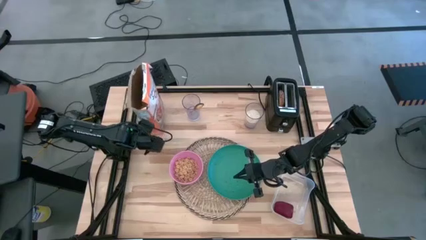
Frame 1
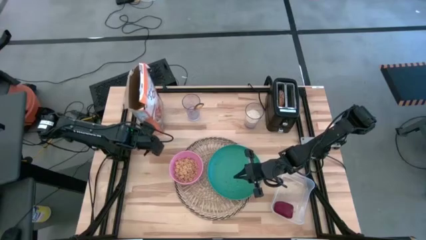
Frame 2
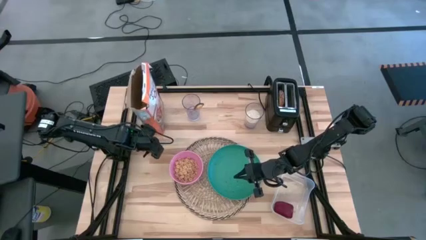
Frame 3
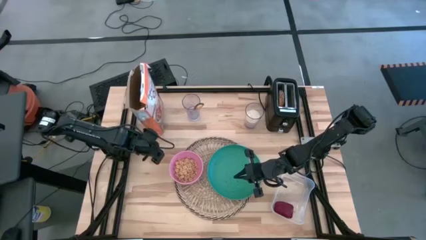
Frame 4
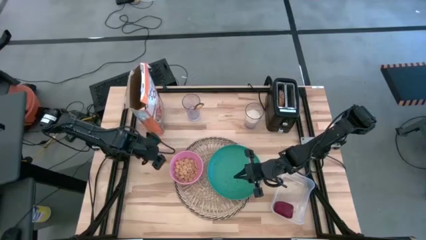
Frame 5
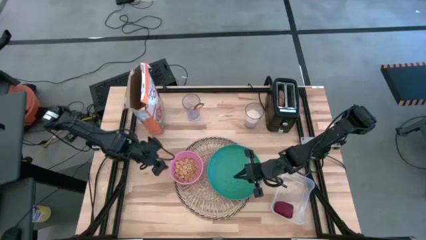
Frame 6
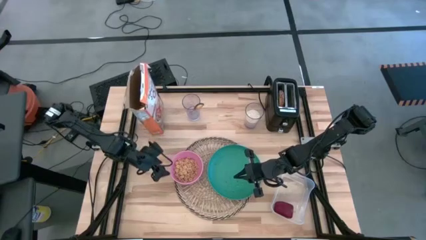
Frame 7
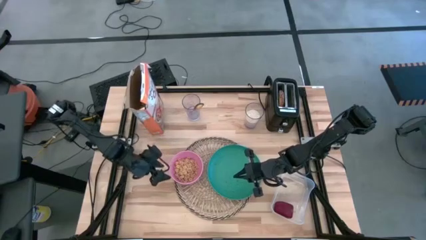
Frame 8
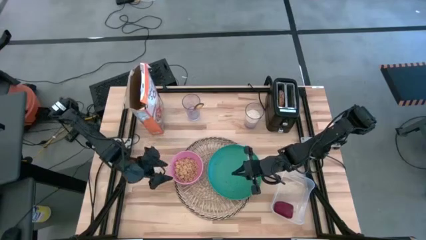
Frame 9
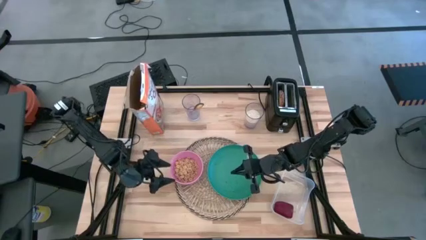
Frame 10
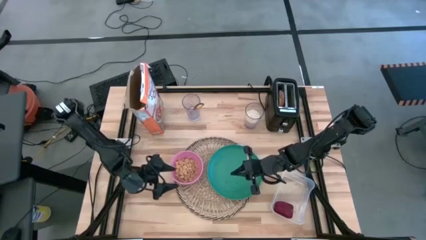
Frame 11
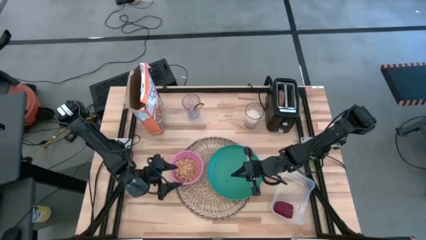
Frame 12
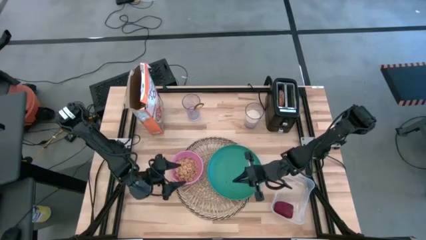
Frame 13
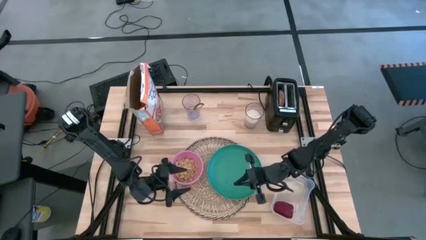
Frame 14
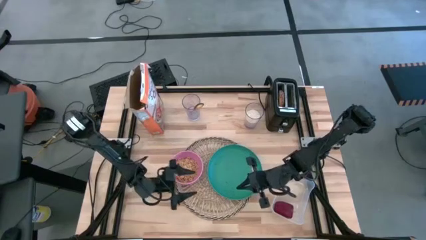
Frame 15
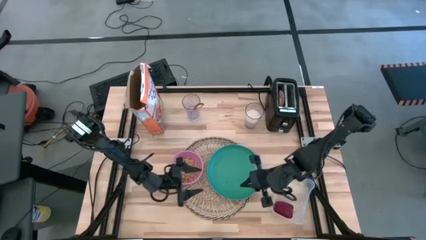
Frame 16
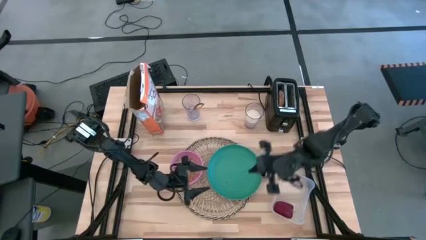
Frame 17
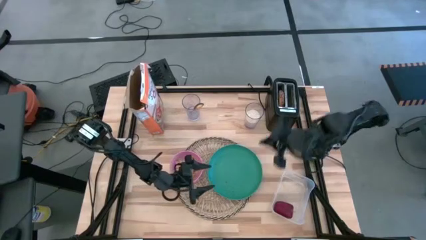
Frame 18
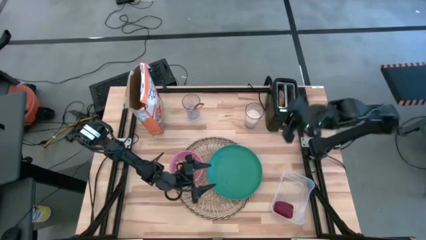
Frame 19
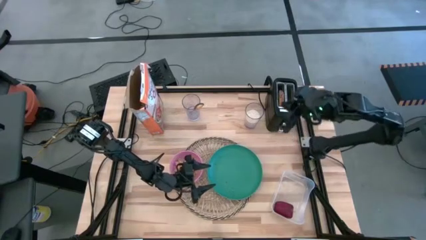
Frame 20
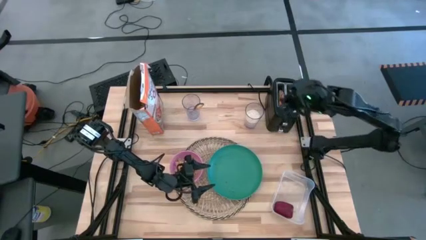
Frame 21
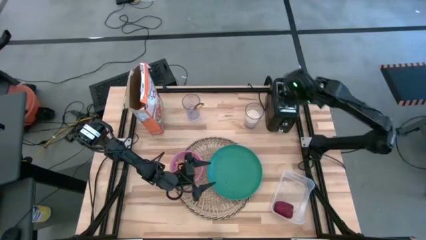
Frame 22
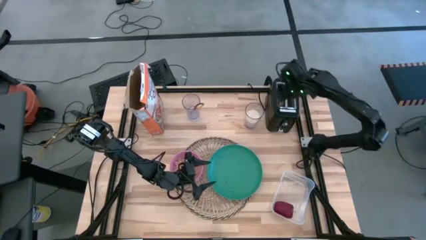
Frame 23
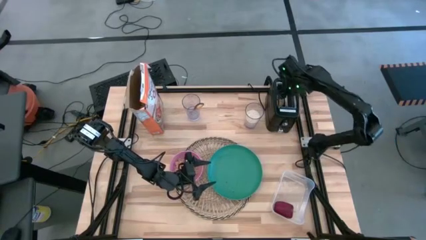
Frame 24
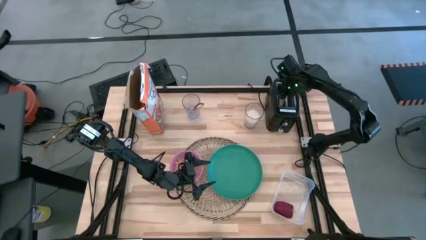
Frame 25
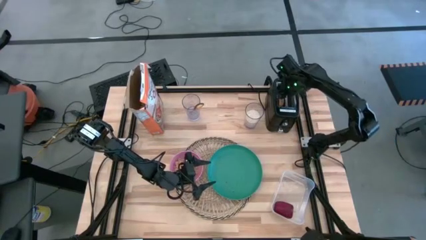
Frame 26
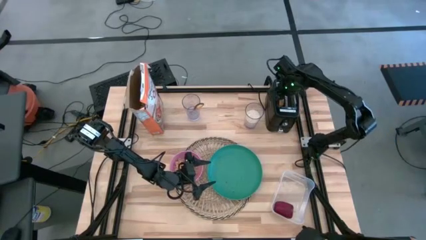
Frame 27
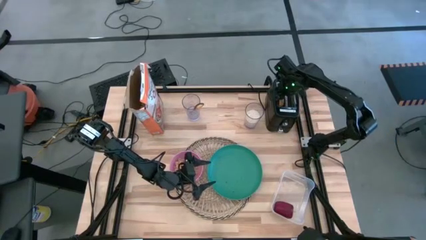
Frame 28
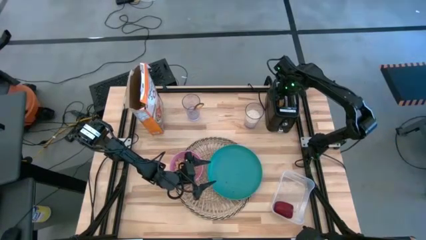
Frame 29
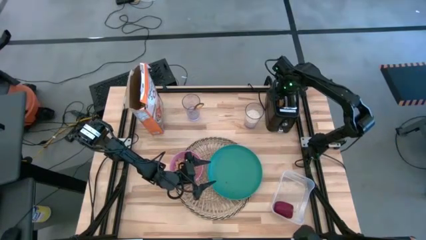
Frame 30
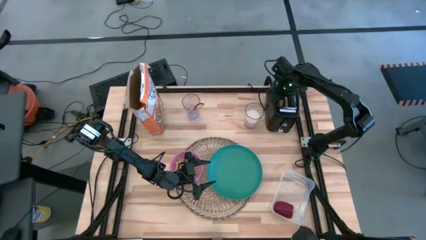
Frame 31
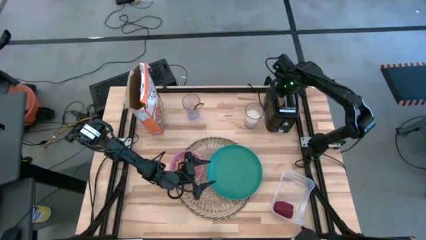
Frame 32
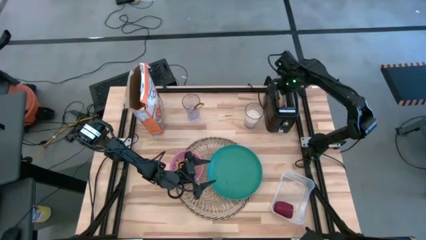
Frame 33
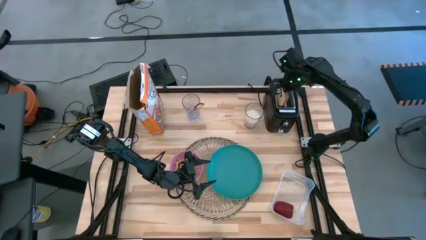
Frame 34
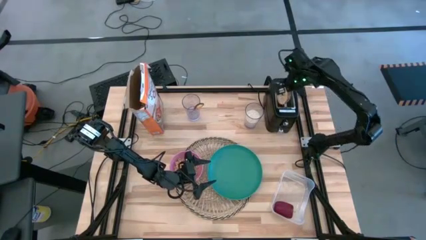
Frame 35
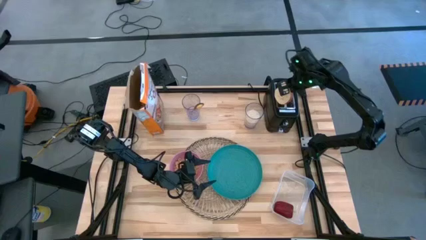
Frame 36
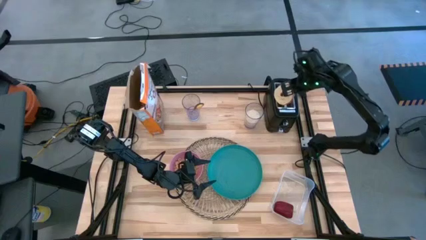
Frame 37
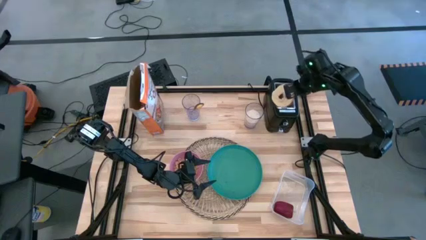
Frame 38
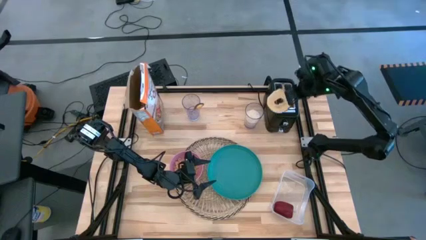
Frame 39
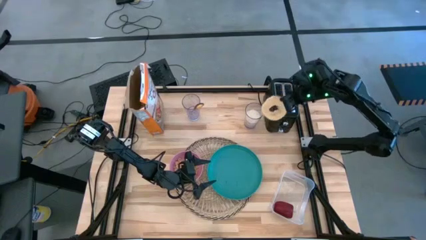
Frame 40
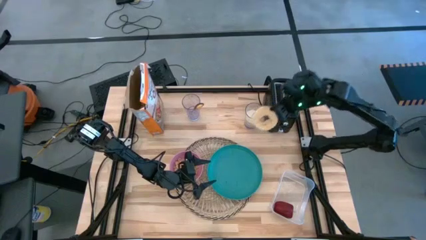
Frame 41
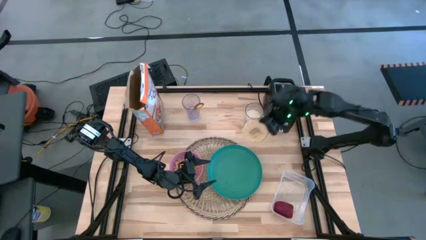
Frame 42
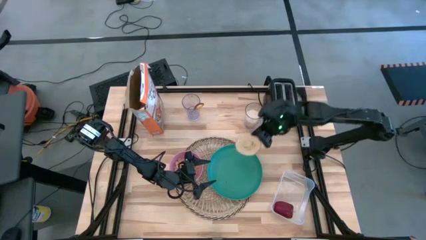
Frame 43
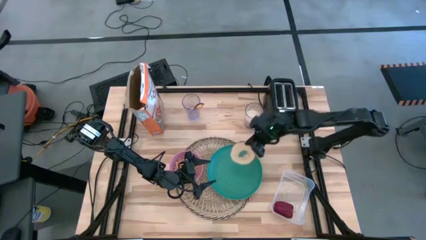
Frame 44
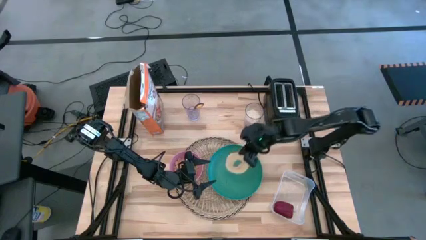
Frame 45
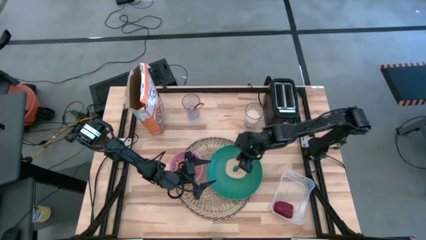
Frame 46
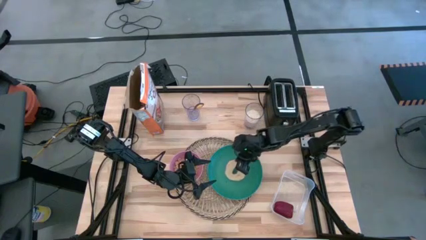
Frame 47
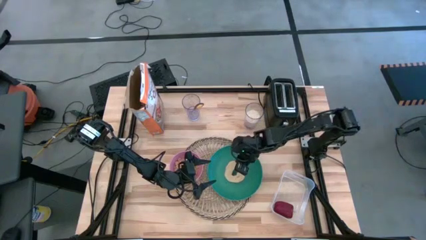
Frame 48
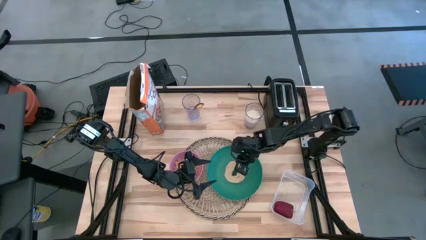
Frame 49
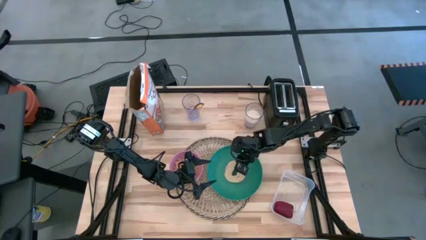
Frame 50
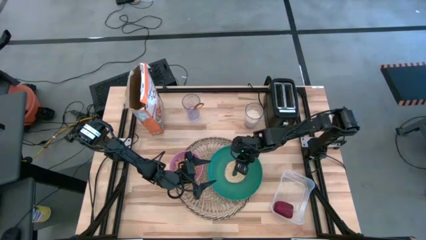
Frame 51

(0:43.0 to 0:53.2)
Task: Arrange a breakfast setting
Put the toasted bread on the green plate from the toaster

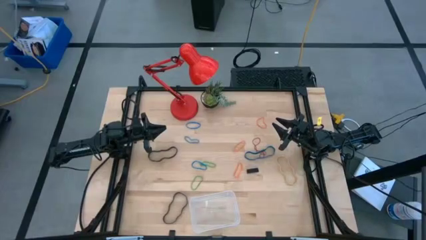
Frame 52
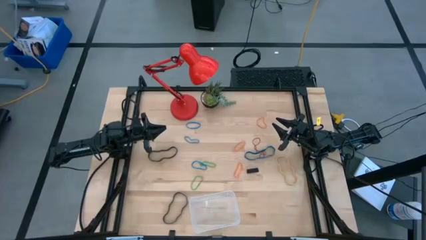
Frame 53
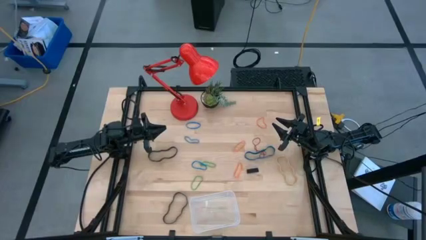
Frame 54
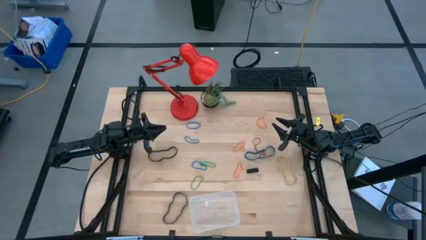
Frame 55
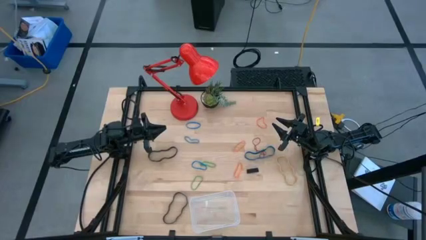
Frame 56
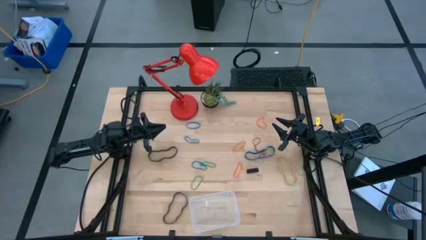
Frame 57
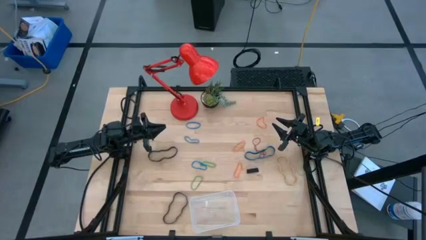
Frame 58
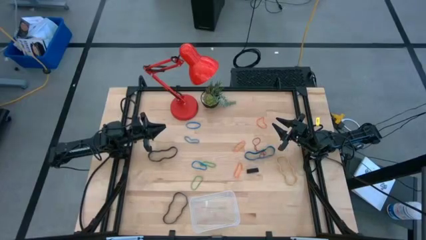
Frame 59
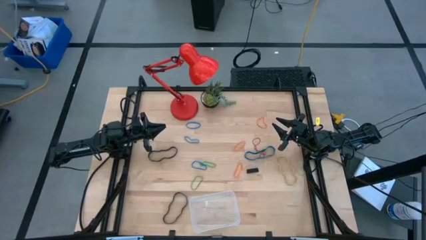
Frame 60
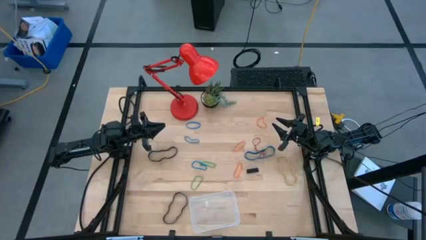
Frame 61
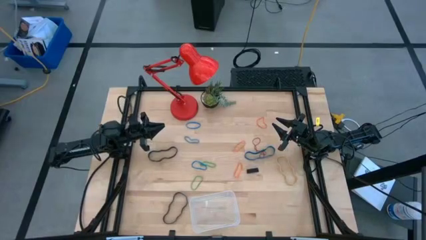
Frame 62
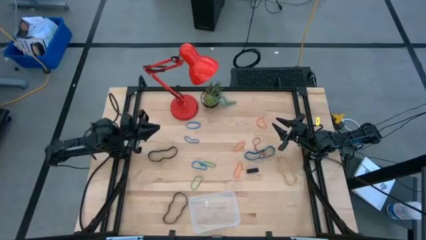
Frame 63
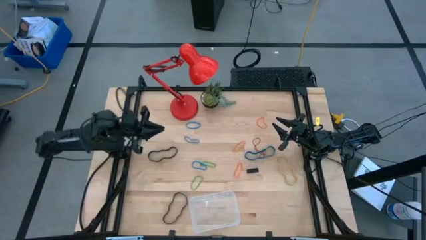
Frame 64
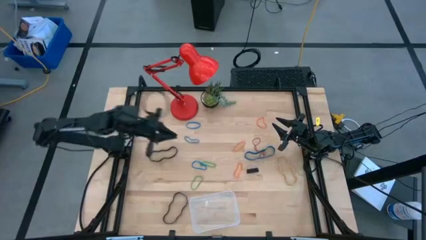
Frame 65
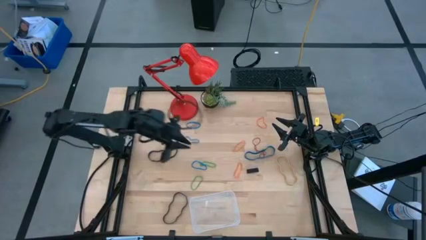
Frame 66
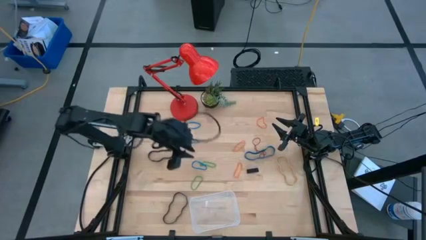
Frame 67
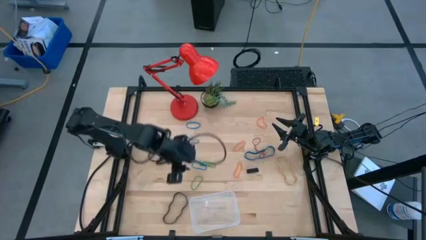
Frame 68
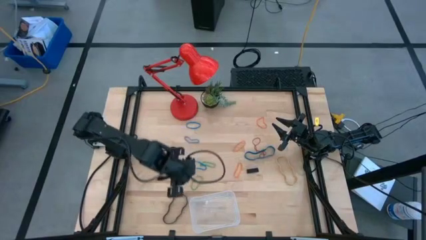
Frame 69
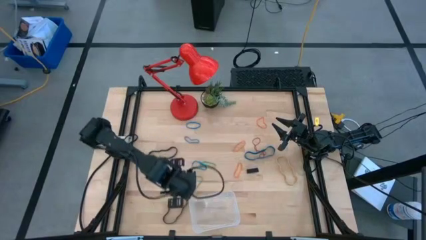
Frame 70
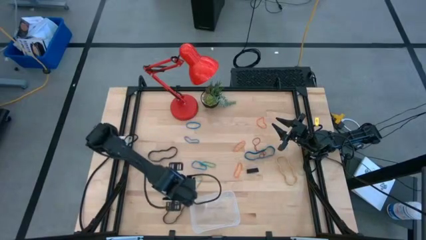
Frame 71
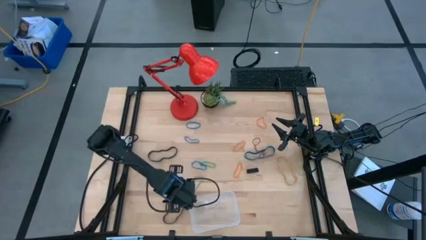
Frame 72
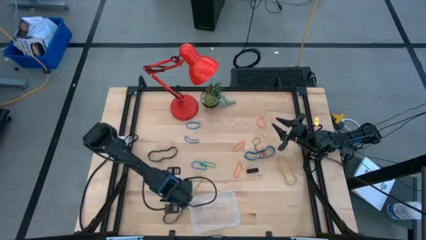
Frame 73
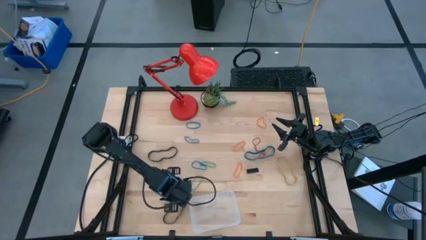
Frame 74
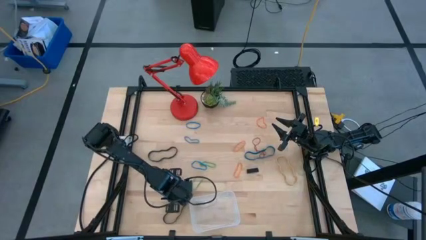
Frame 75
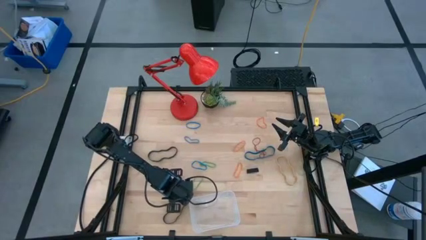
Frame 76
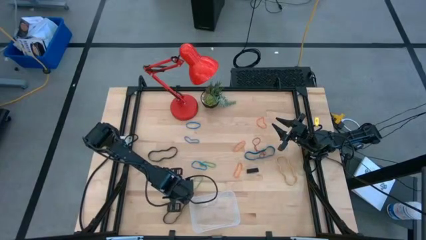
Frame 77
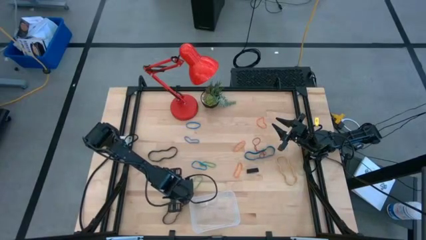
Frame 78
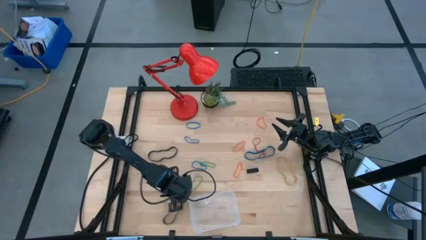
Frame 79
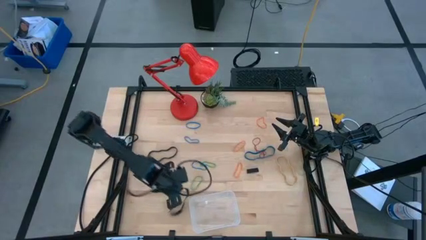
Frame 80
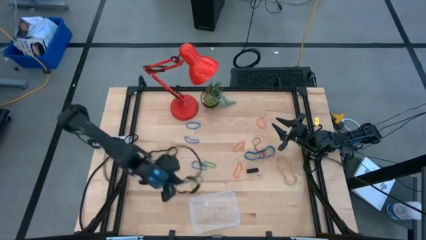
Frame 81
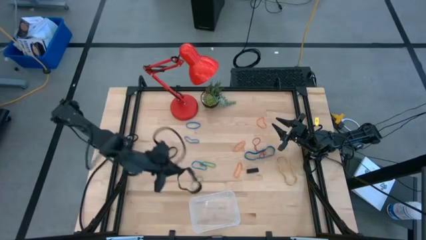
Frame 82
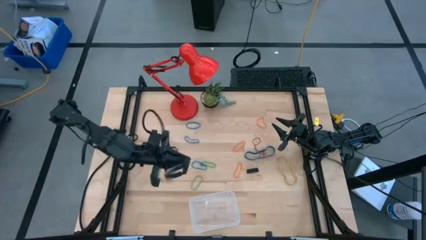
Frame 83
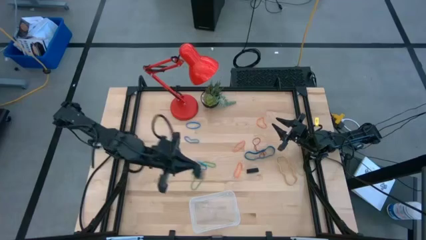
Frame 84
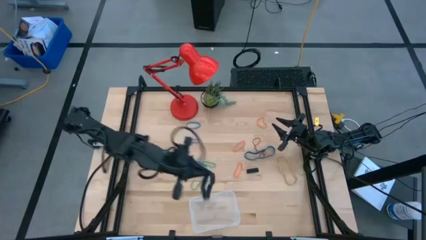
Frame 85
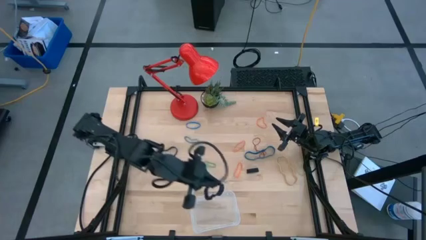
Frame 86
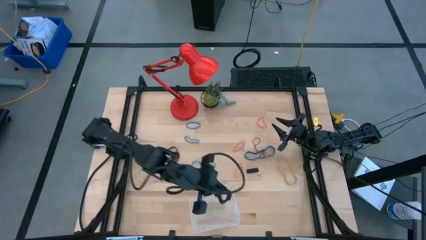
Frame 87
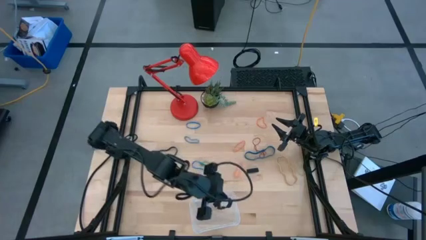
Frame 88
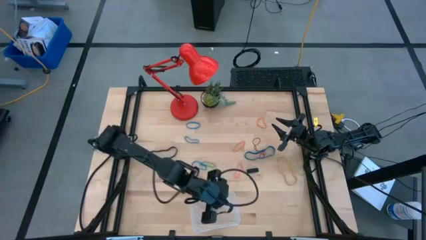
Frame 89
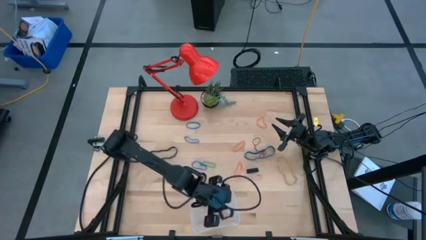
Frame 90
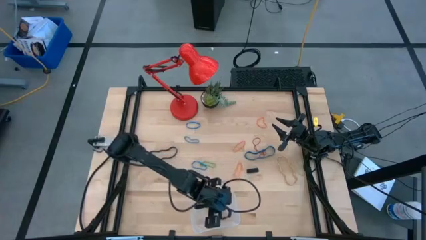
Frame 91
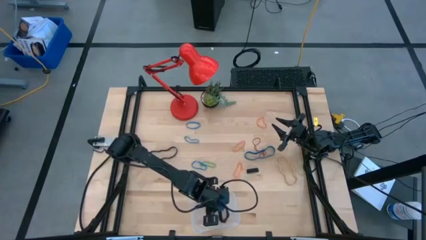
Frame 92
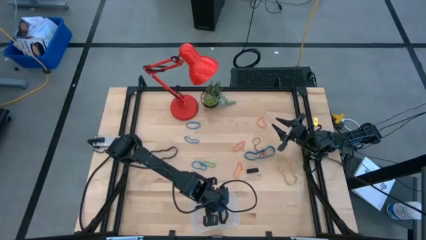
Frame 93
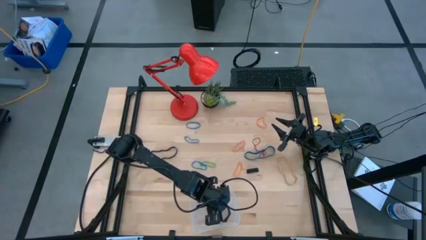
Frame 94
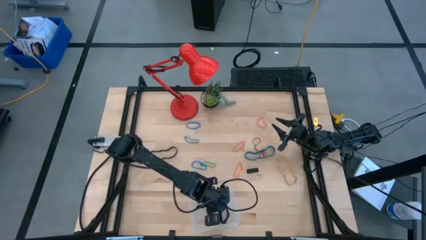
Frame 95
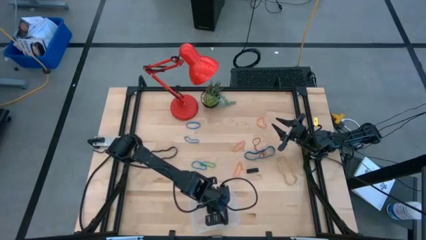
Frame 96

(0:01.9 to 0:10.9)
Task: Pick and place rubber bands into bin
Put the black rubber band into the transparent bin
